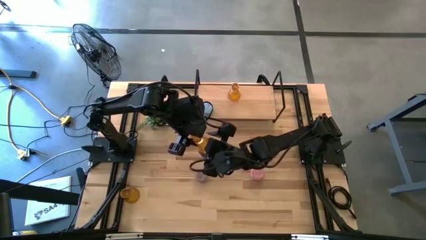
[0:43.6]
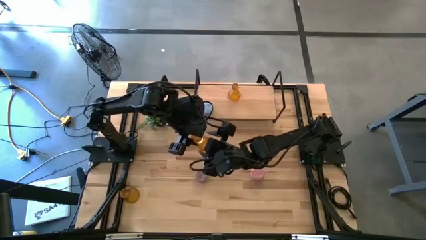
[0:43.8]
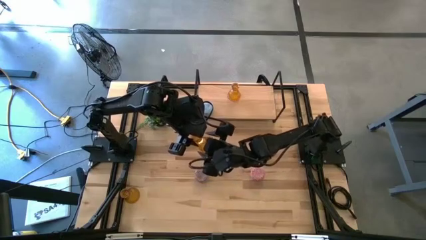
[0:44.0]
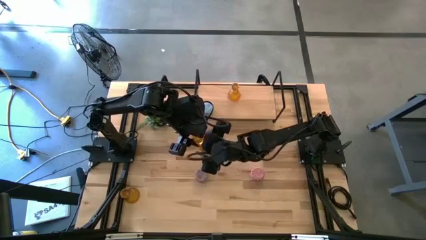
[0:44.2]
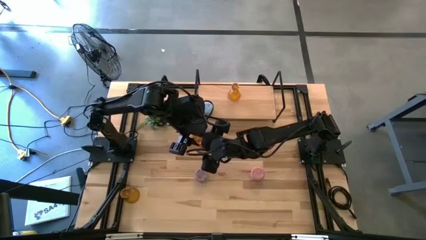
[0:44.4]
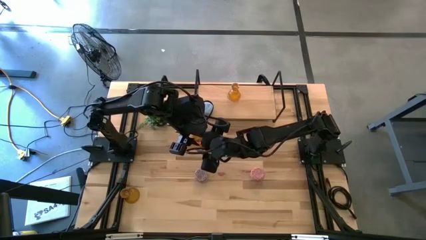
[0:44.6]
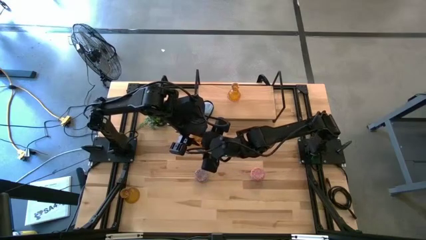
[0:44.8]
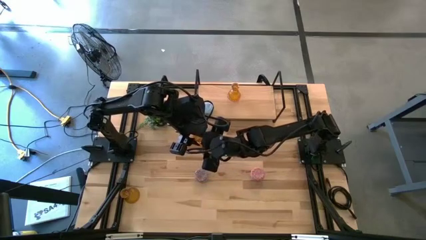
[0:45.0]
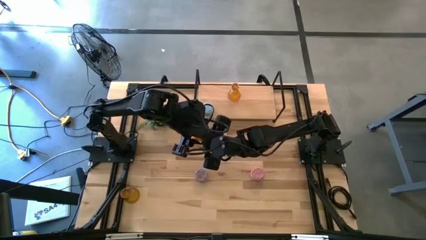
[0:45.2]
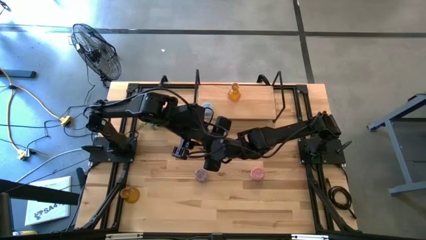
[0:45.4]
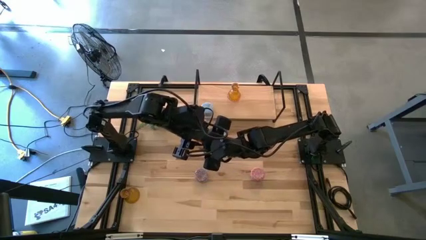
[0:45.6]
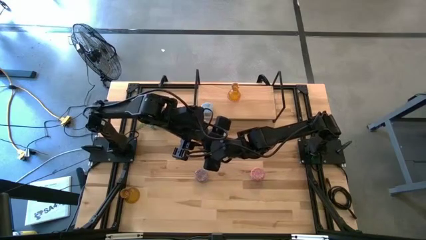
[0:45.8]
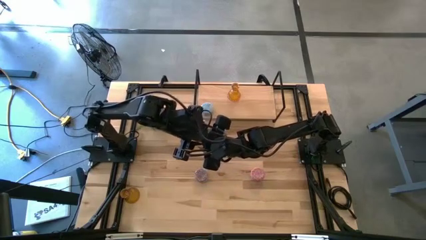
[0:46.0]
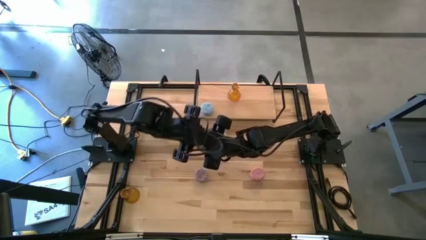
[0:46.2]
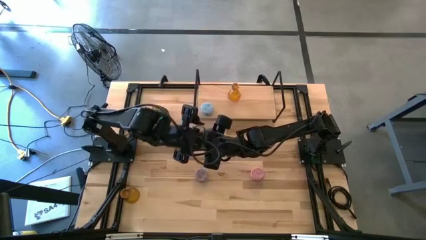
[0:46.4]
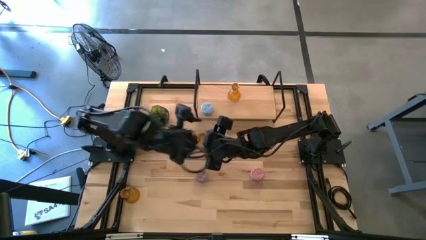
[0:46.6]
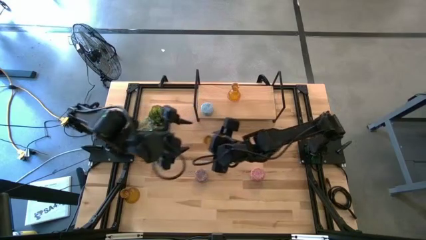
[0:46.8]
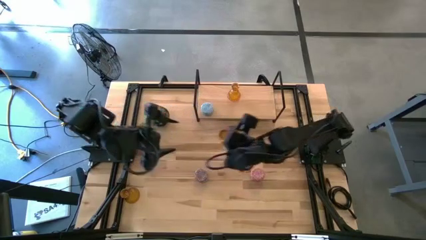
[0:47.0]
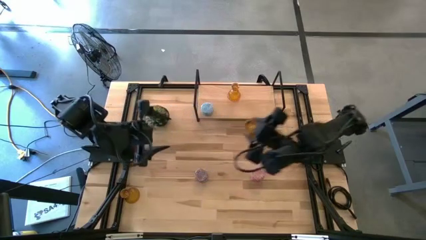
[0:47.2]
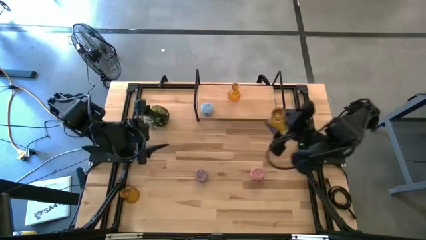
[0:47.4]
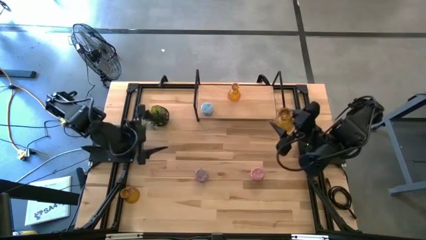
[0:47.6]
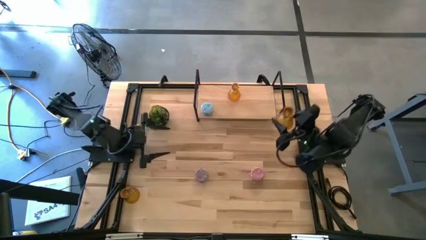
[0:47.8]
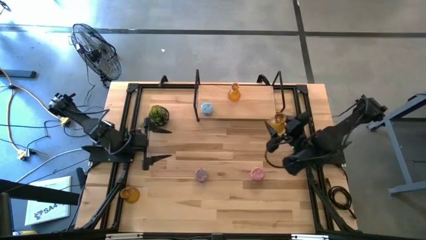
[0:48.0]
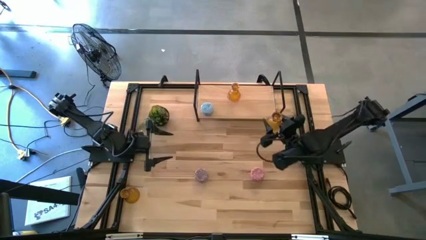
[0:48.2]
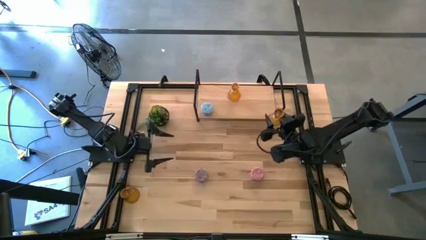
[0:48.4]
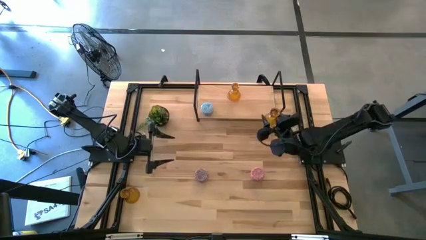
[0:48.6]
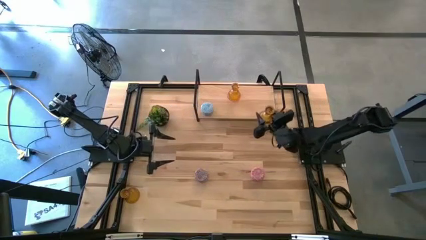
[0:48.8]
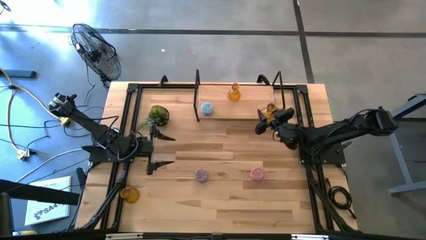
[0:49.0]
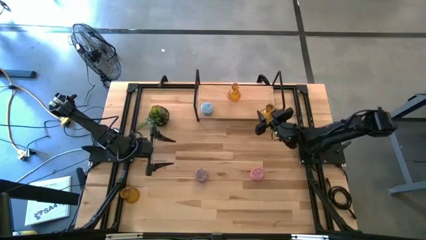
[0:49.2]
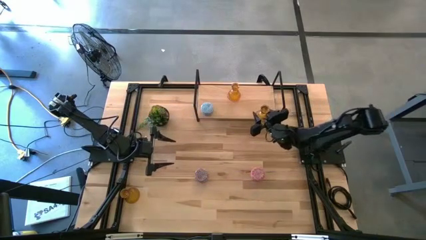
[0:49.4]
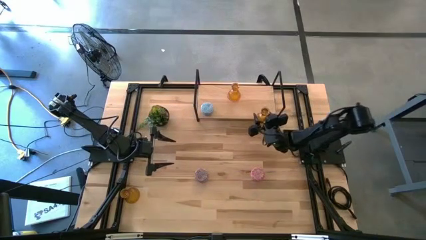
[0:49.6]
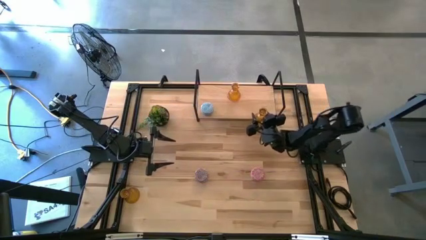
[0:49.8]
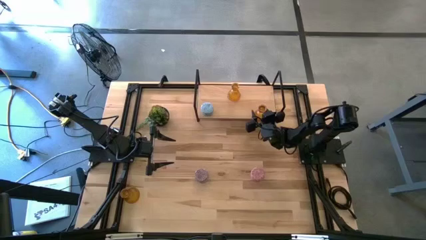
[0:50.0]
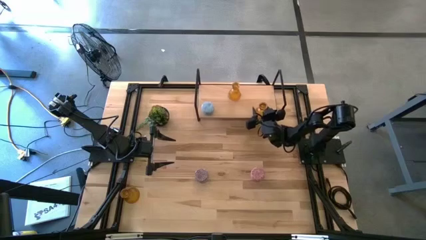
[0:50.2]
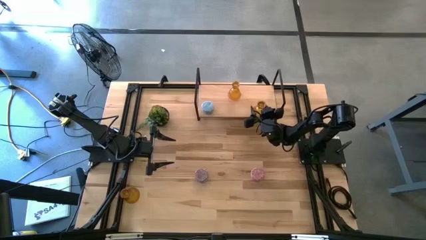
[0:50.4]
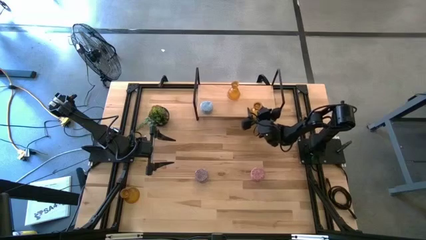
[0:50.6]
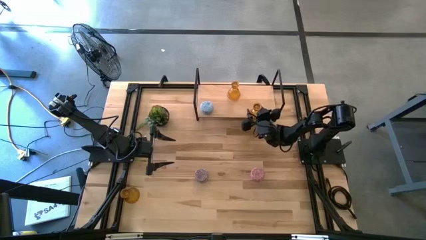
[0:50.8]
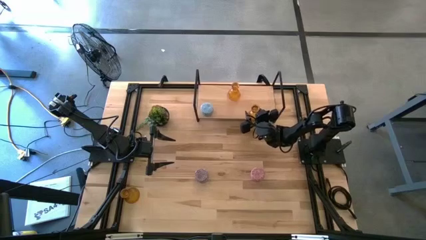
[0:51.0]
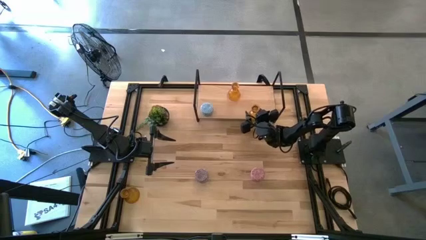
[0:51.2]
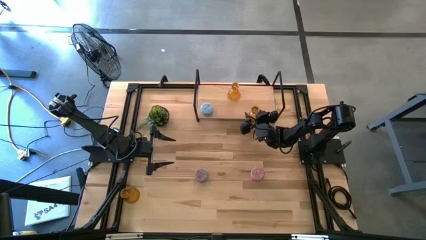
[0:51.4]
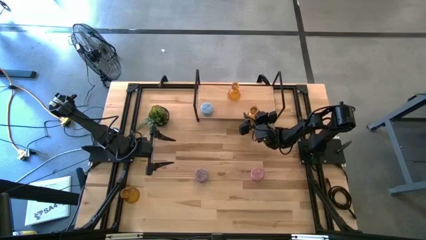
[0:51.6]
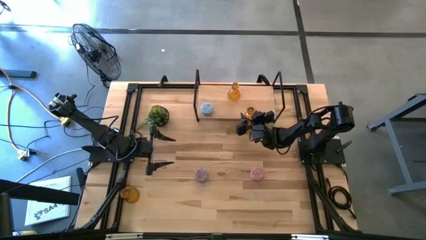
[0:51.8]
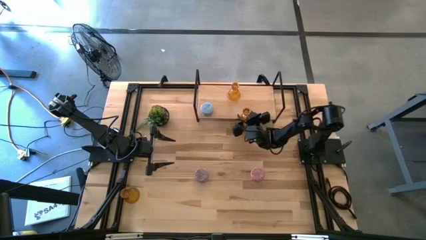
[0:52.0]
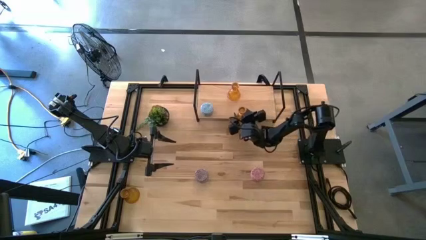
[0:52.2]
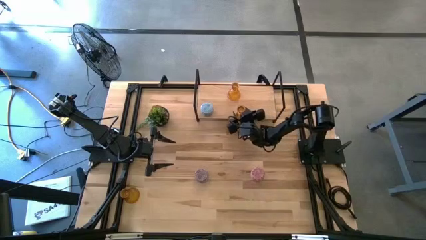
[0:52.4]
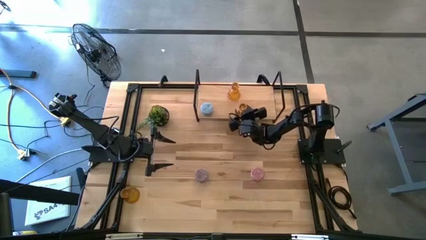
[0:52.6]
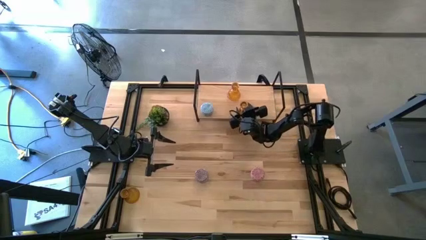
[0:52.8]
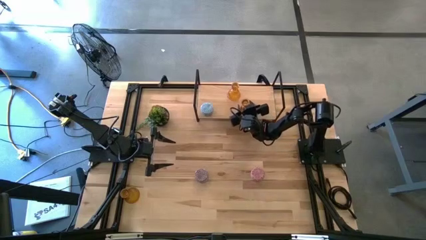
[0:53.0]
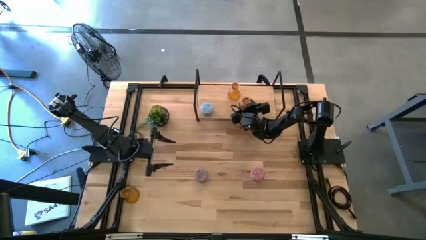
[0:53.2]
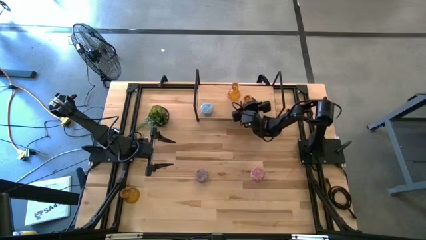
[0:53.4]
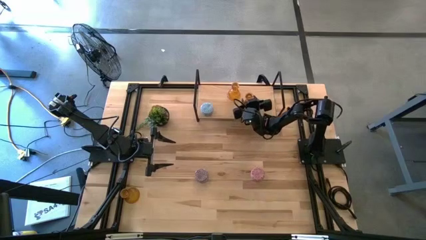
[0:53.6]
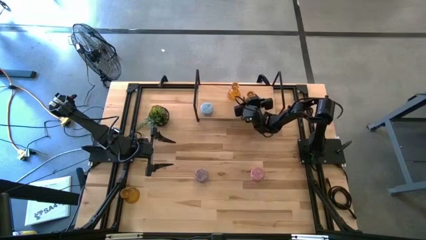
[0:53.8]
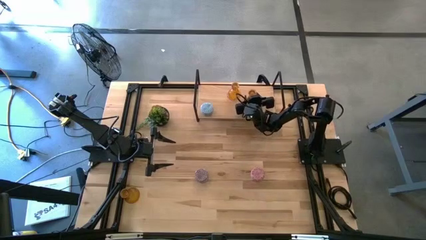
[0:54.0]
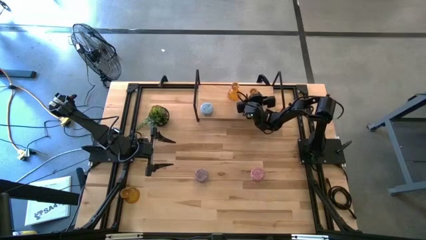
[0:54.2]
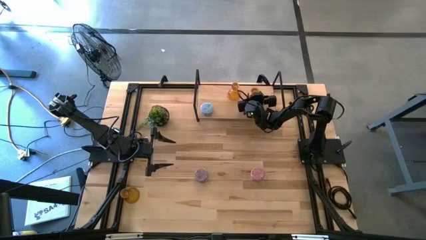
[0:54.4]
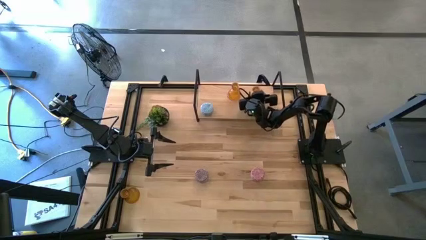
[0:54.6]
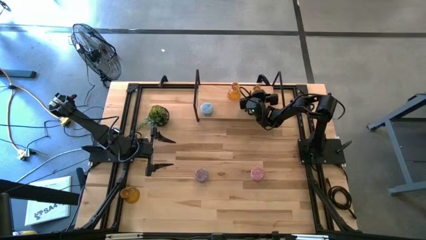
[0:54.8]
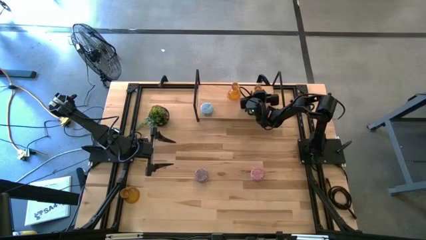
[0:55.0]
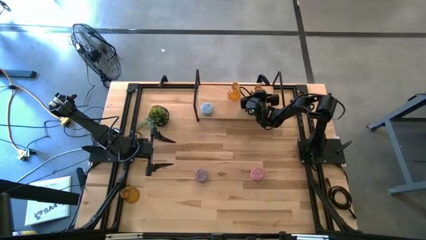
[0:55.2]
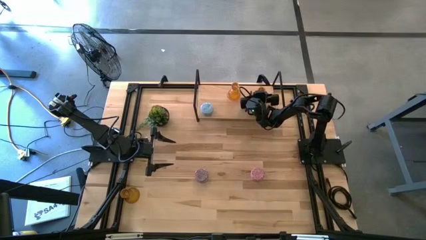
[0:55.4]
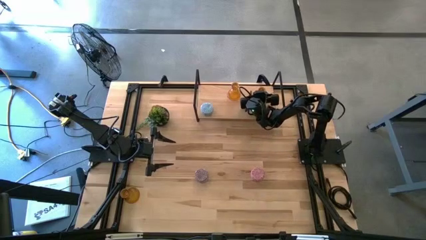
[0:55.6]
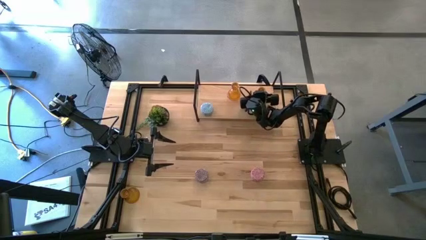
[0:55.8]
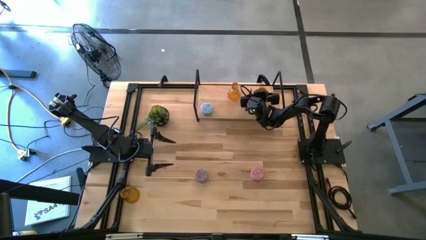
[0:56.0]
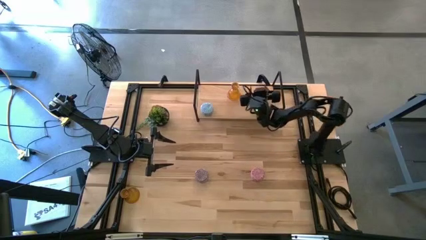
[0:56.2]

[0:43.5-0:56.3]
Task: Pick & Place candle stick holders
Put the top yellow candle holder on the shelf aligned with the other yellow candle holder

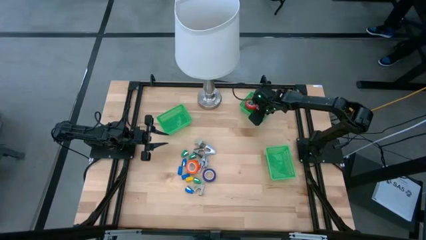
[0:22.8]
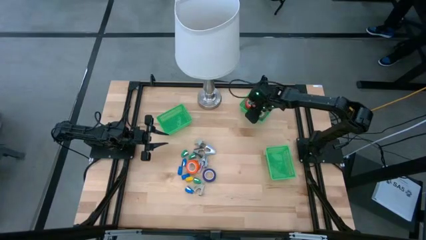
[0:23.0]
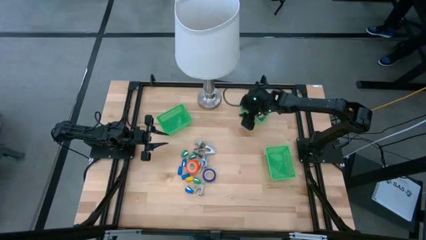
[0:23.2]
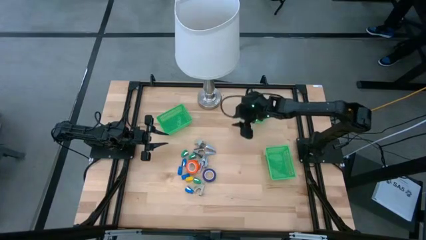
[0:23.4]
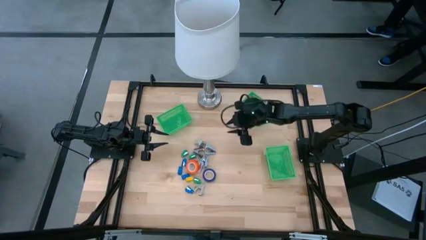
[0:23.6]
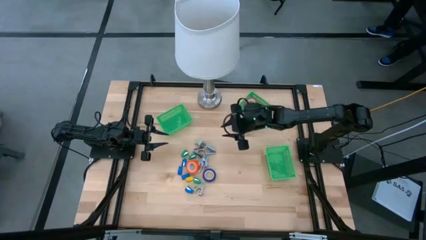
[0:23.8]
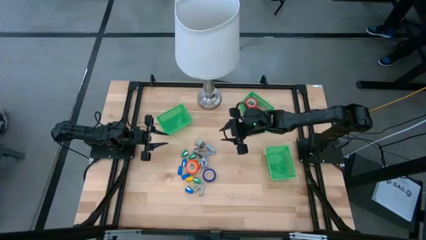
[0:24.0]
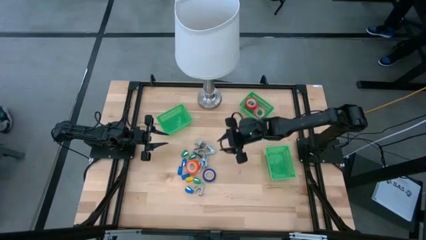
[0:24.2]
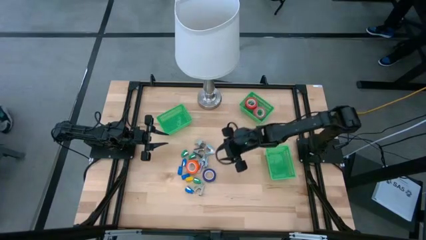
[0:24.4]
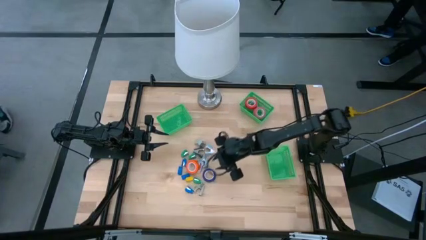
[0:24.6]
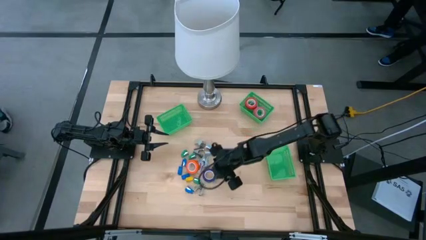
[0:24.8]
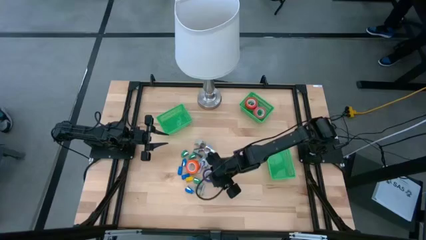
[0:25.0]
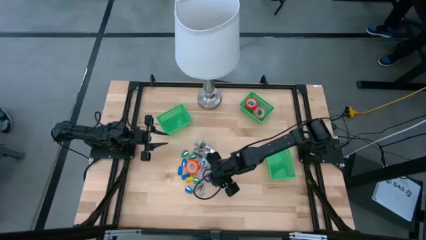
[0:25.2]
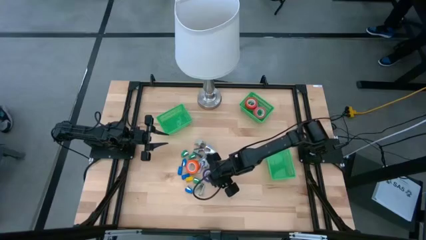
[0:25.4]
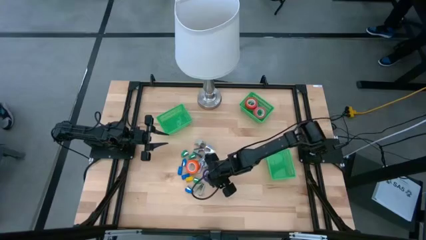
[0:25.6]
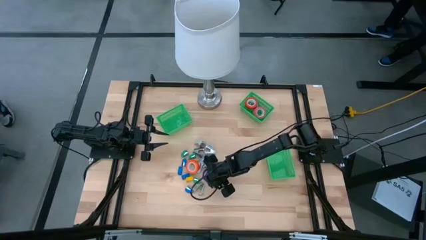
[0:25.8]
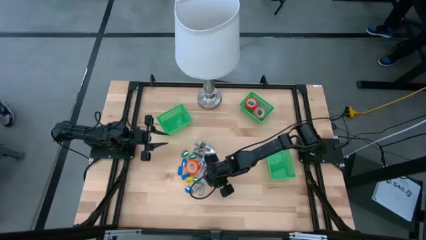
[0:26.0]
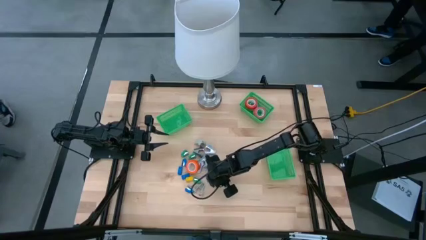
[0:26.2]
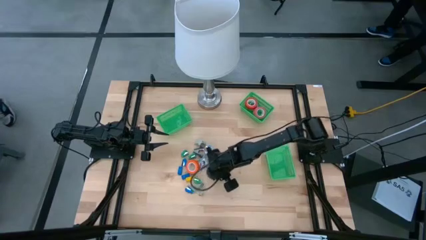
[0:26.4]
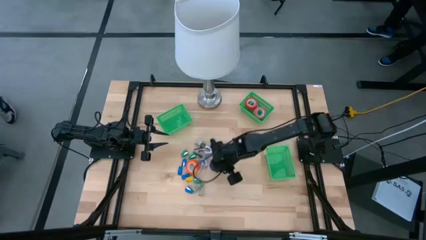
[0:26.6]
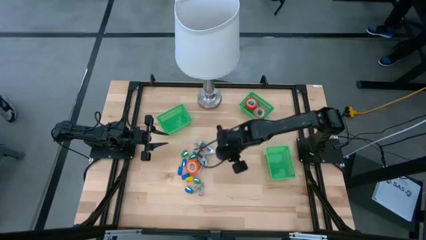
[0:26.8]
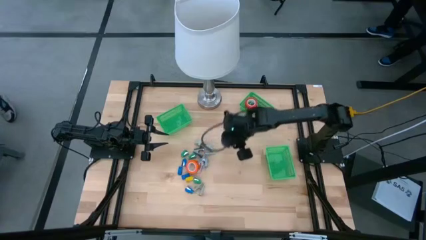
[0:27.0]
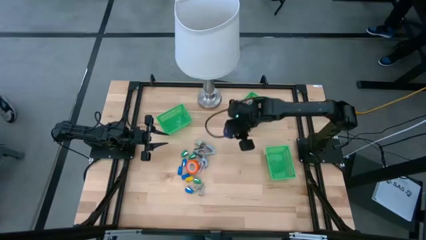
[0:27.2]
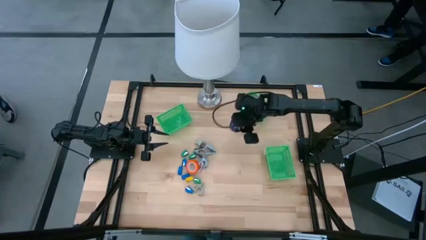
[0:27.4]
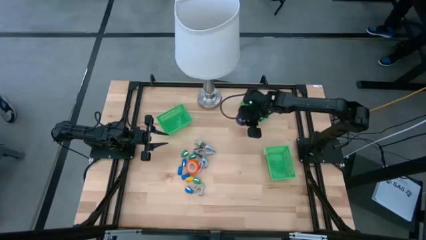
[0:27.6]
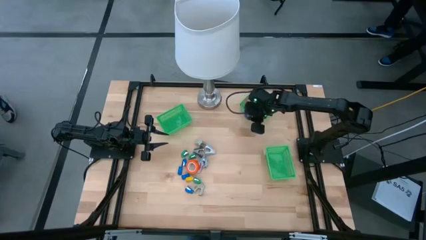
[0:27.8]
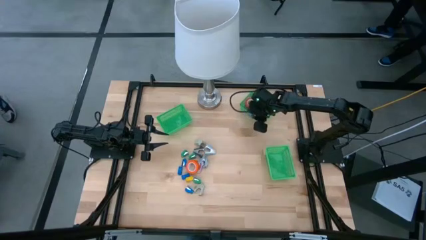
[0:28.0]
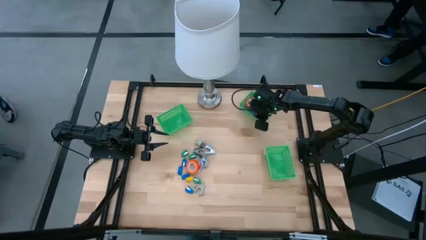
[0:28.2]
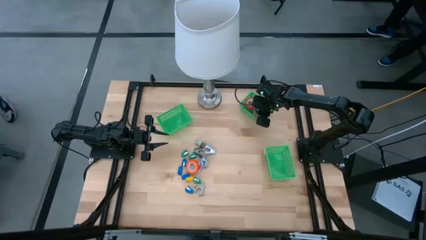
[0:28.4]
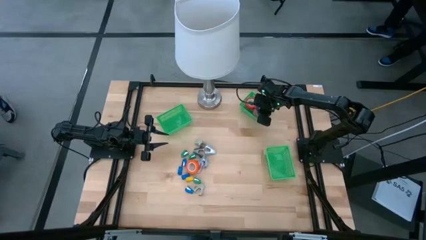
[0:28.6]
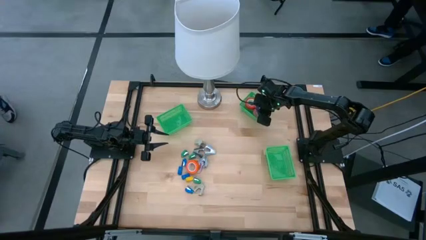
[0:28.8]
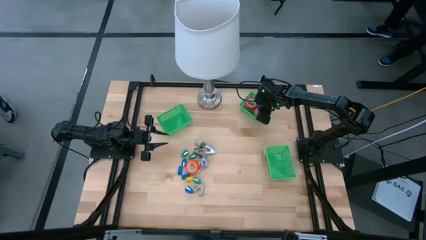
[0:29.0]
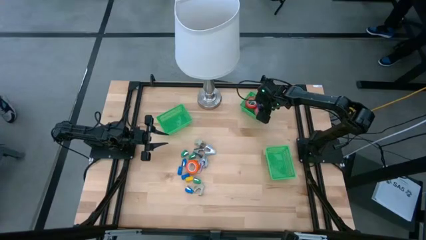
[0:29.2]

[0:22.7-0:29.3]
Task: Pick and place Stapler, Stapler remover, tape
Put the blue tape into the top right green bin
